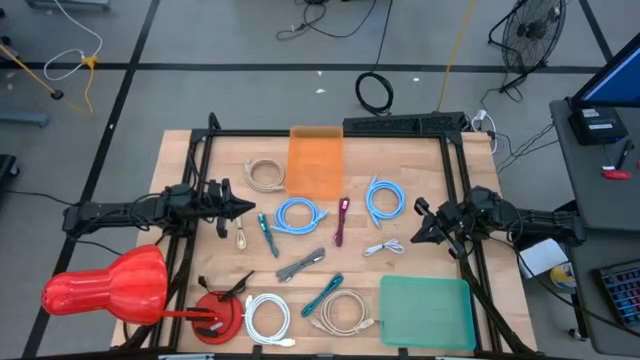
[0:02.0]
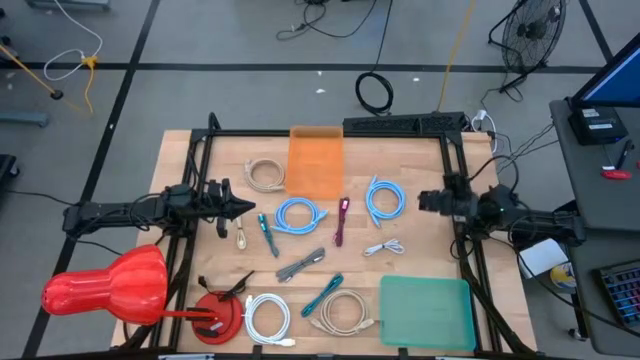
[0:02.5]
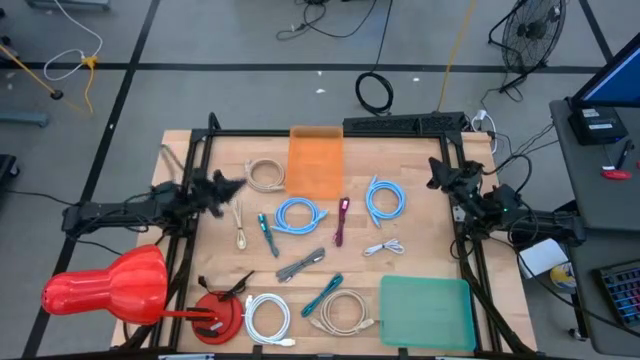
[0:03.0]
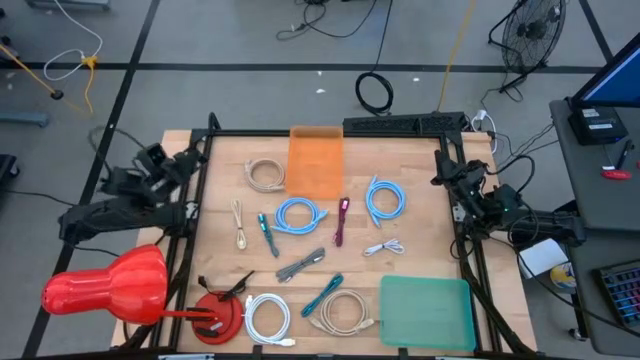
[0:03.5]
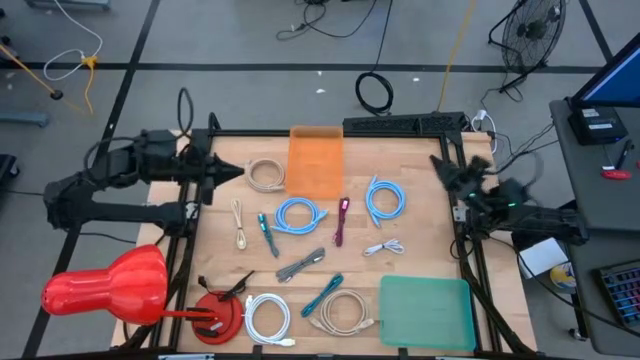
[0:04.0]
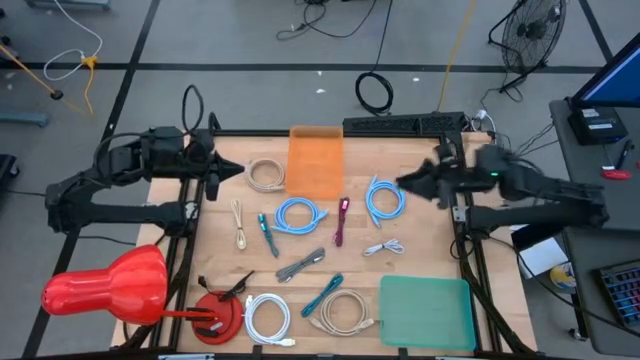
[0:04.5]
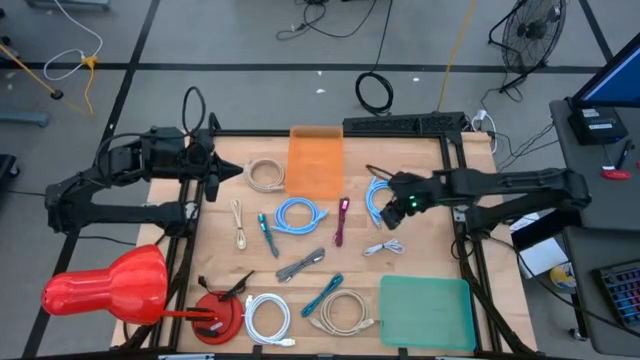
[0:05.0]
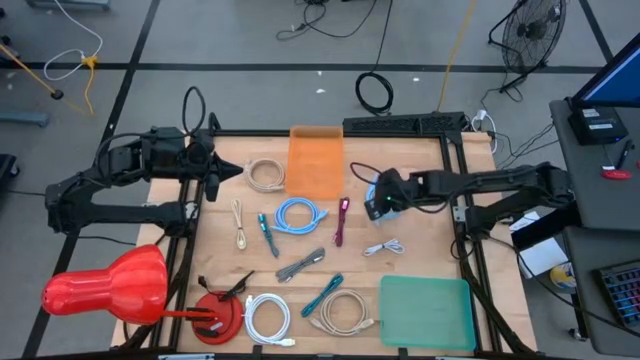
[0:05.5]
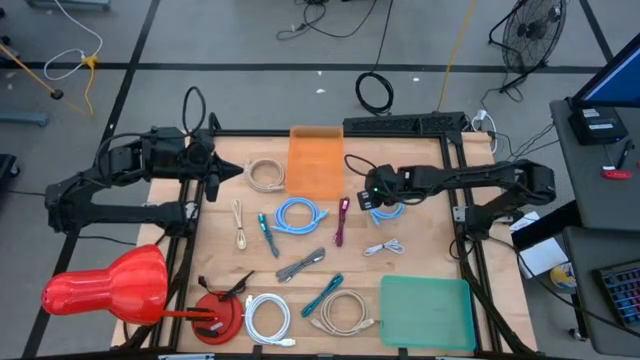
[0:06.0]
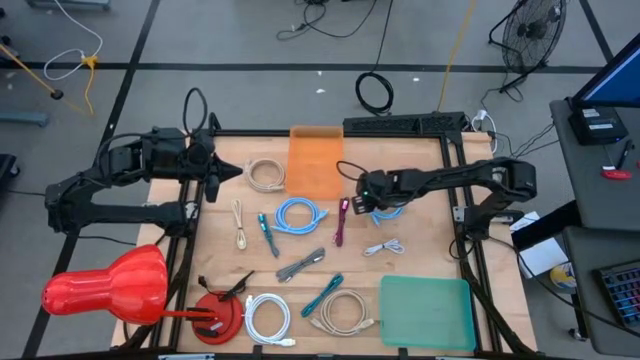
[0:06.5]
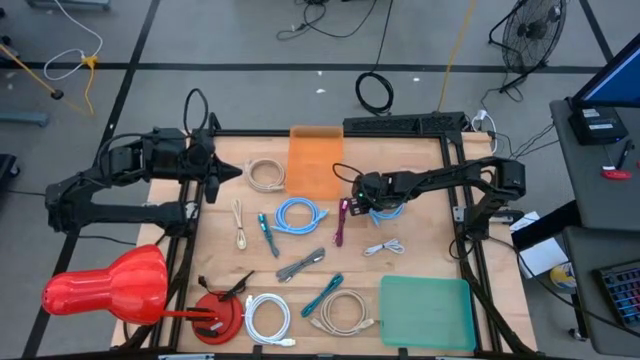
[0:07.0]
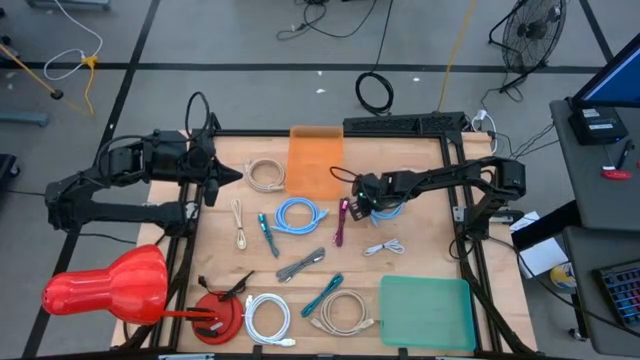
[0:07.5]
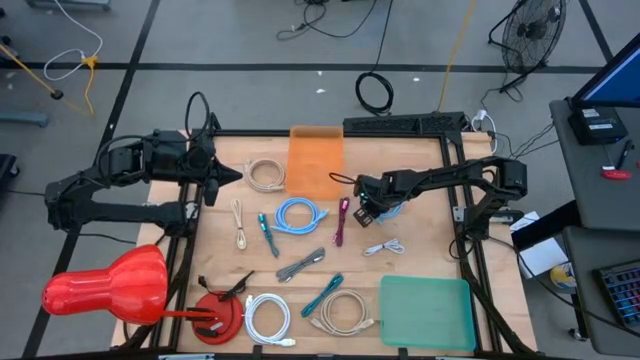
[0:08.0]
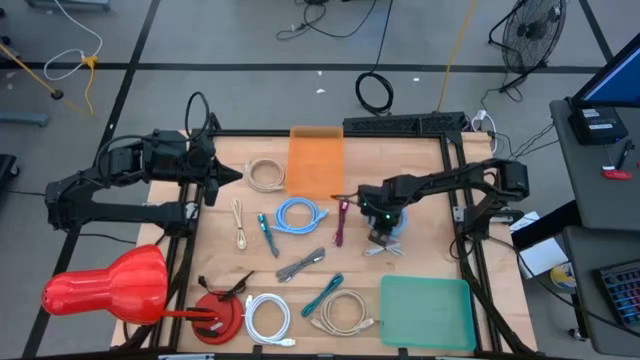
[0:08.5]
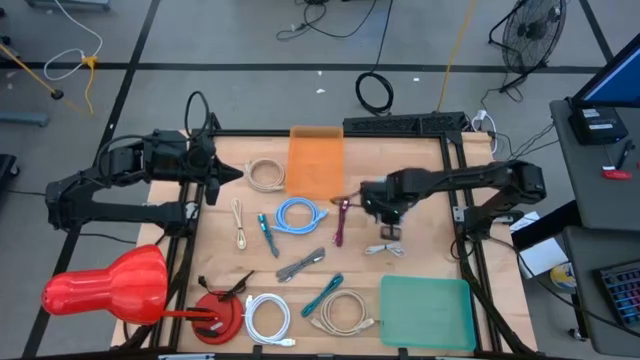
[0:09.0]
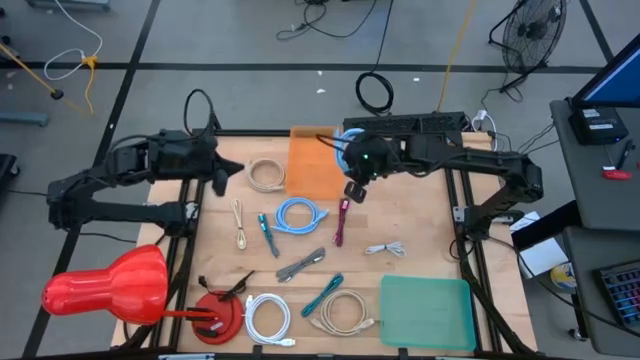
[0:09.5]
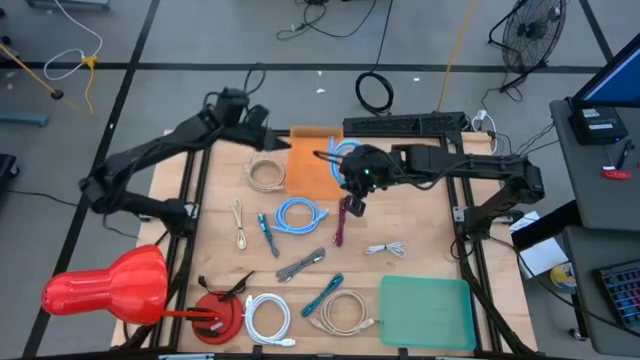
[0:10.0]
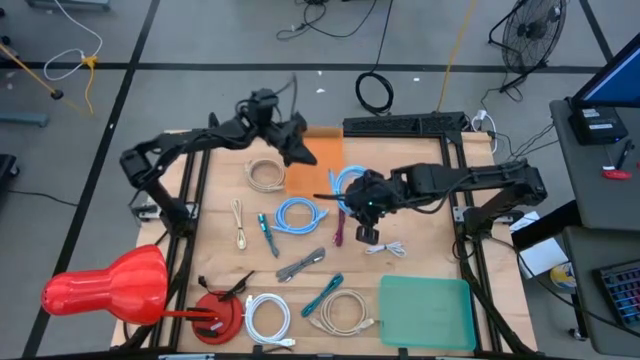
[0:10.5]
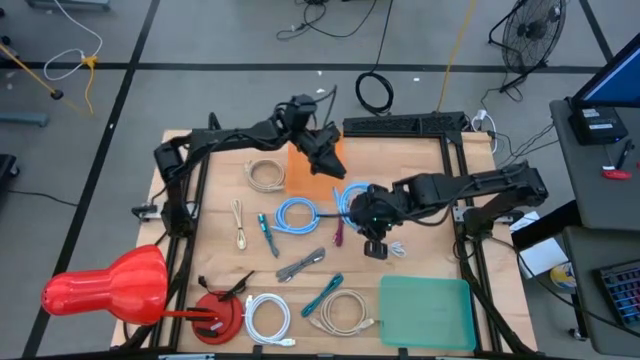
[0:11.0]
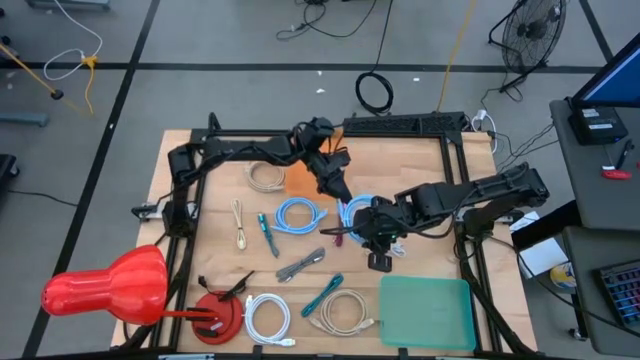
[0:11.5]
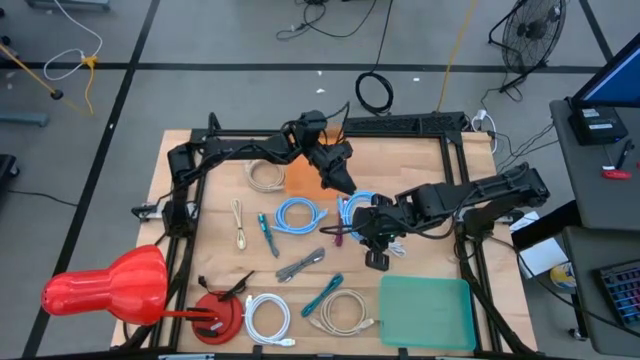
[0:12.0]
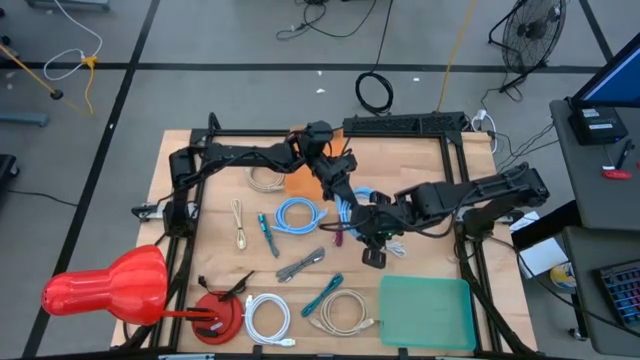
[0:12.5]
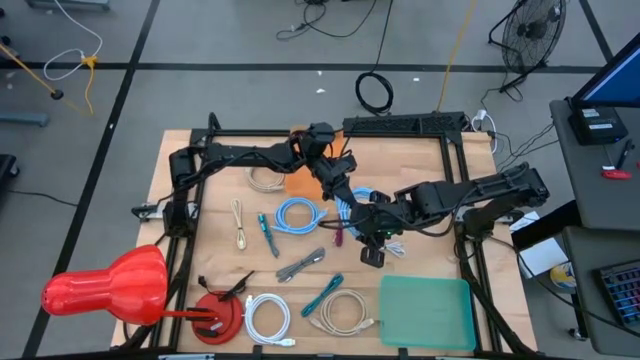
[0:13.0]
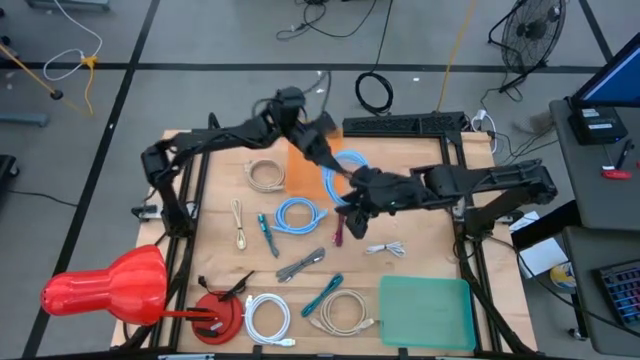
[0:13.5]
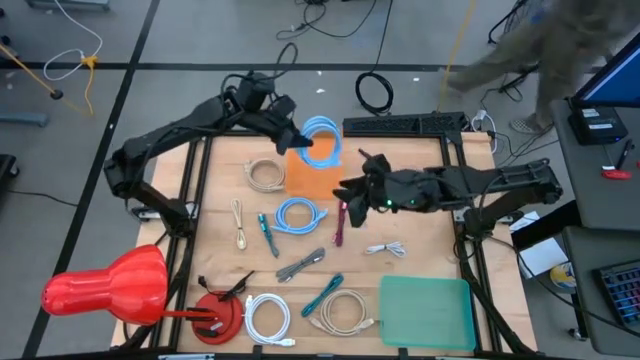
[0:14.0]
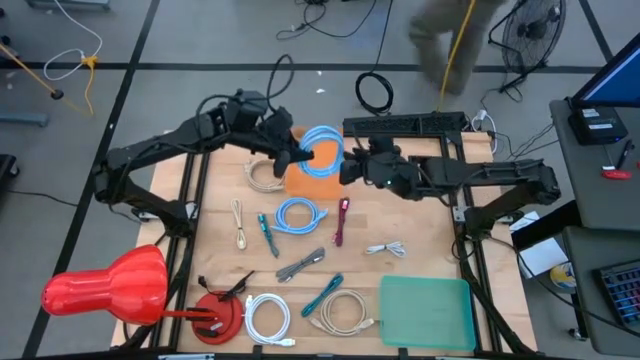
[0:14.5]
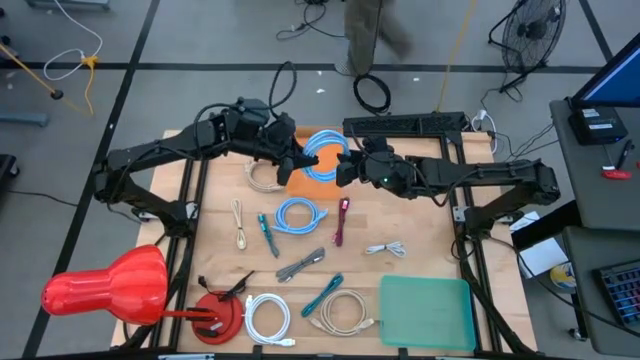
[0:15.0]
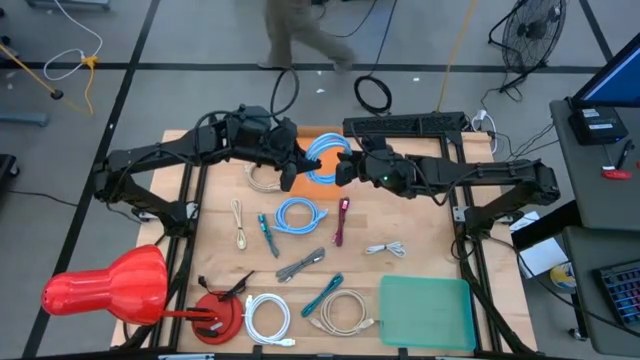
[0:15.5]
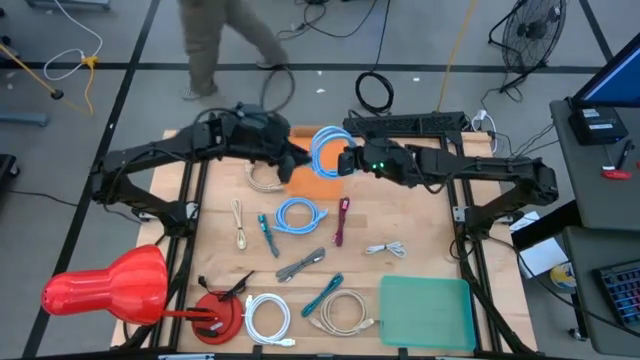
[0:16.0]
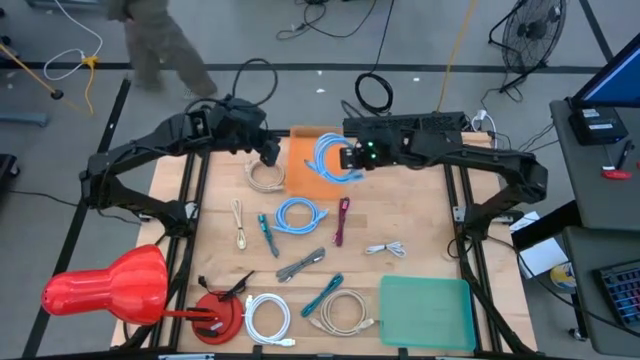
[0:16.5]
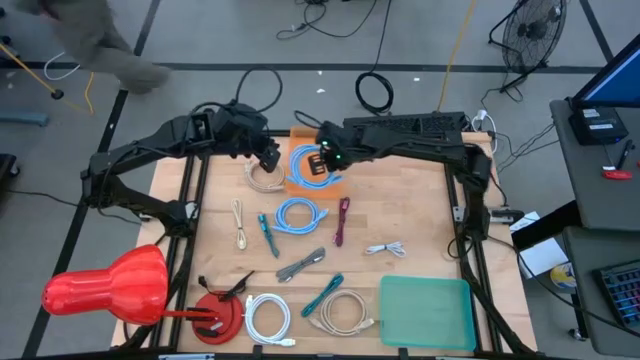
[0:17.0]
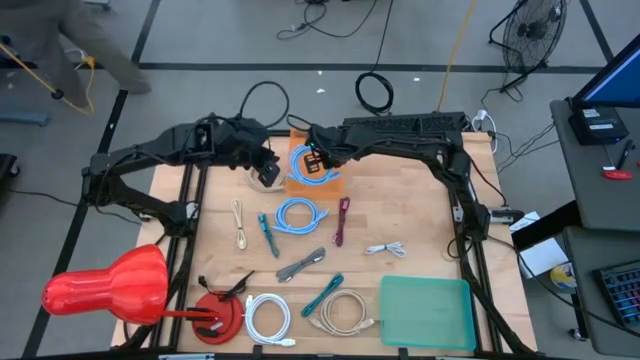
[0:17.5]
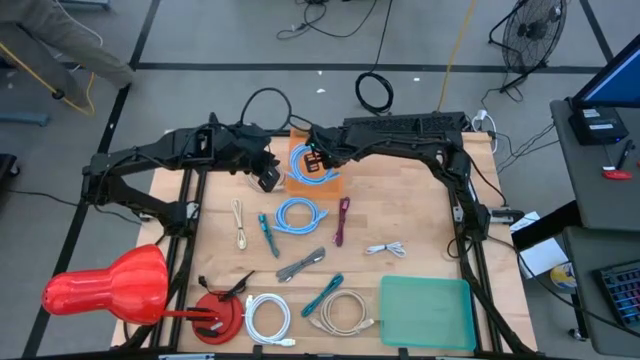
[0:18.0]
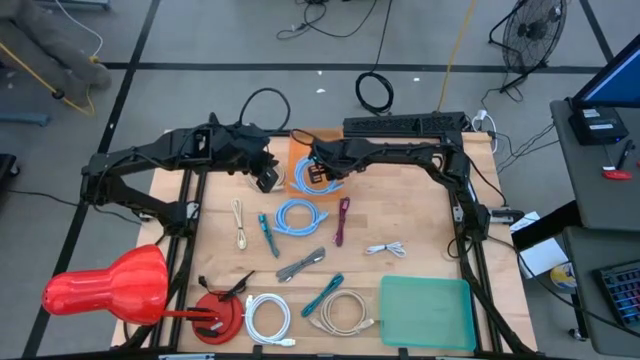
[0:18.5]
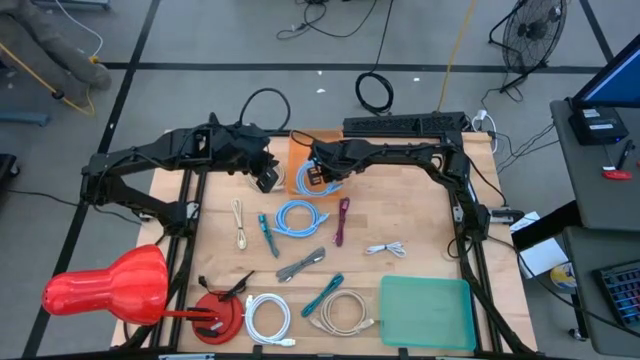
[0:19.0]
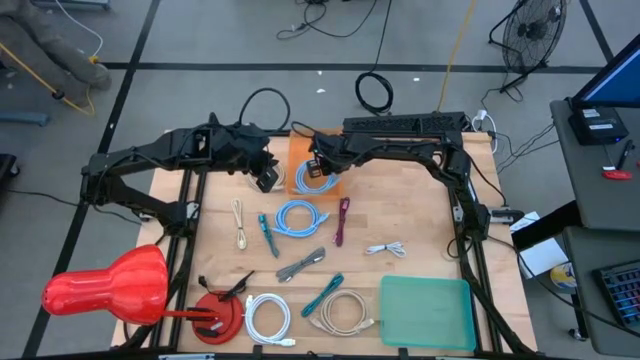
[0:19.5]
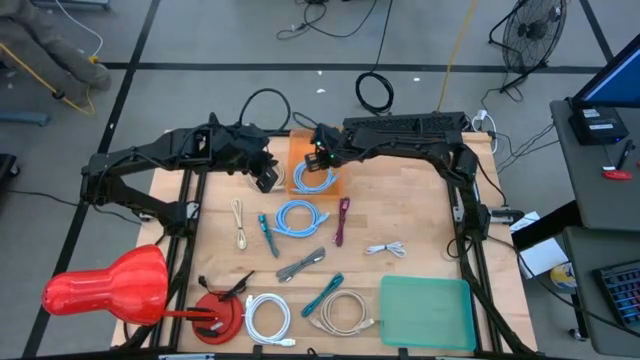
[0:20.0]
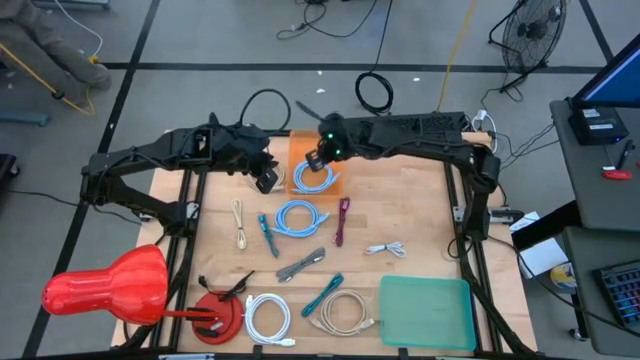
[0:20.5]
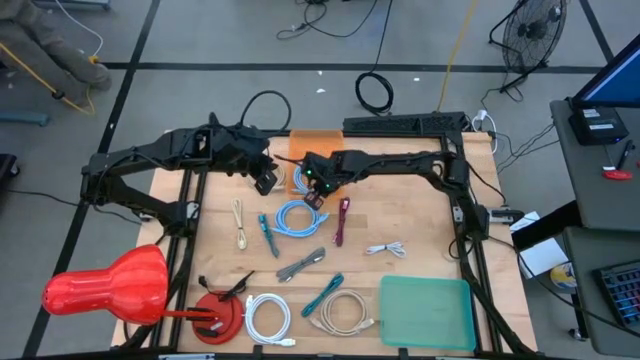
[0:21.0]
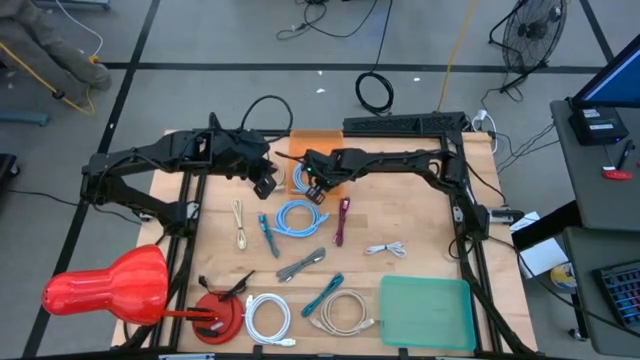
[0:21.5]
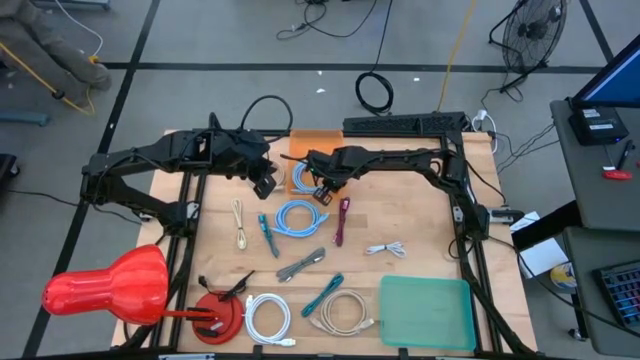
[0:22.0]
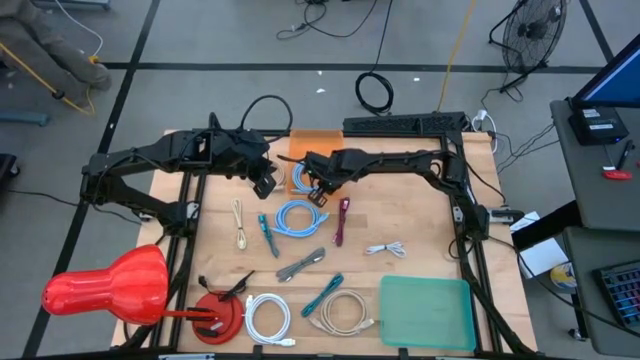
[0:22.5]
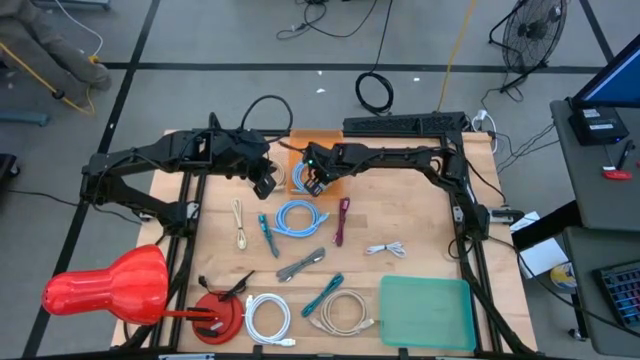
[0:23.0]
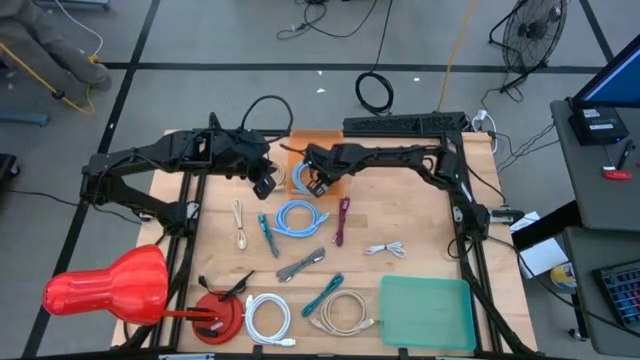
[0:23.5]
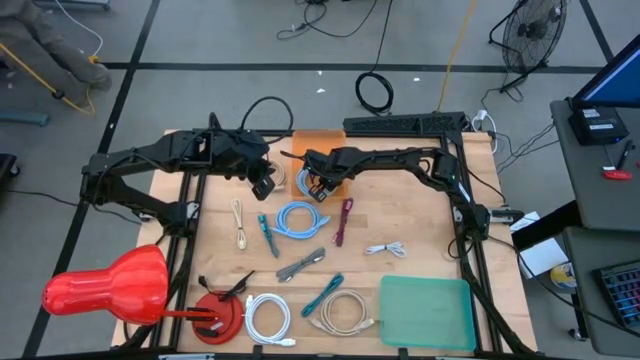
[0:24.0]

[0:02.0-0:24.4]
Task: Pick & Place USB Port
Put the right blue usb cable into the orange bin
